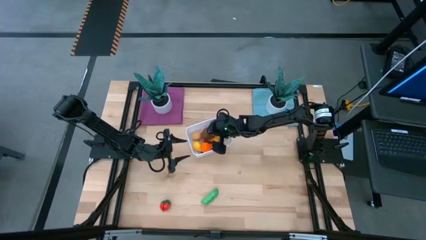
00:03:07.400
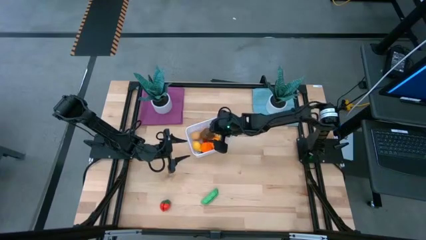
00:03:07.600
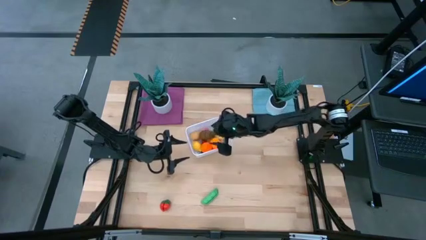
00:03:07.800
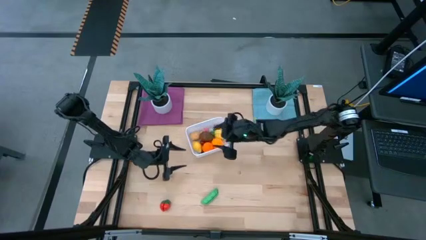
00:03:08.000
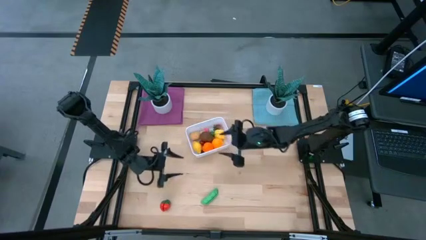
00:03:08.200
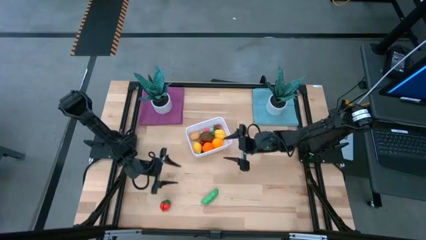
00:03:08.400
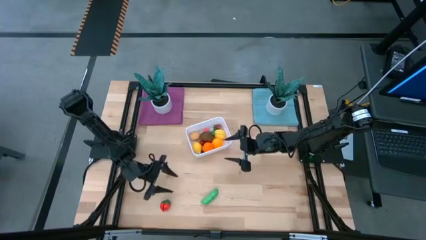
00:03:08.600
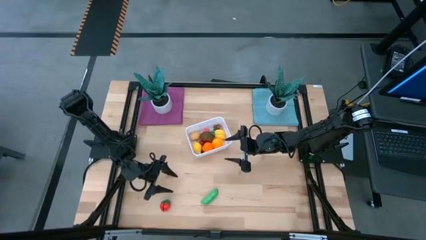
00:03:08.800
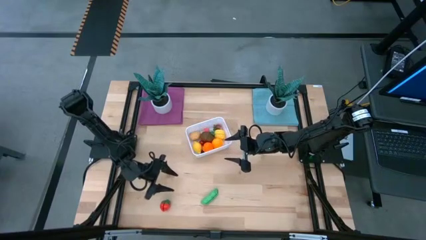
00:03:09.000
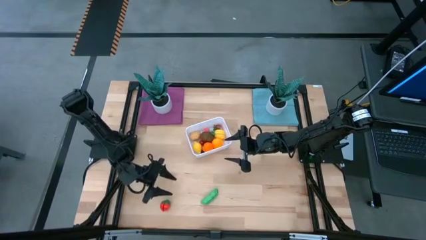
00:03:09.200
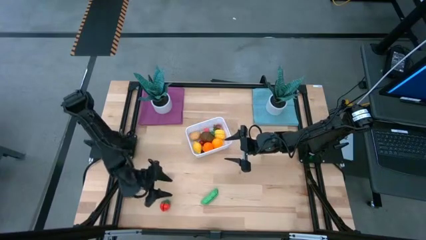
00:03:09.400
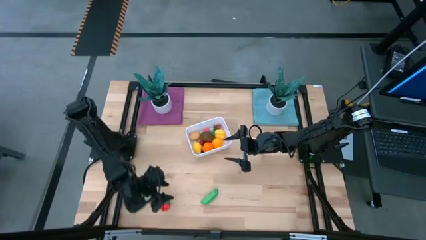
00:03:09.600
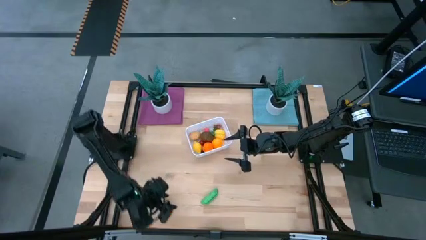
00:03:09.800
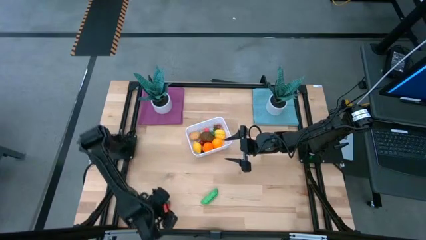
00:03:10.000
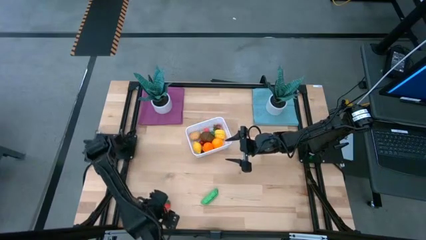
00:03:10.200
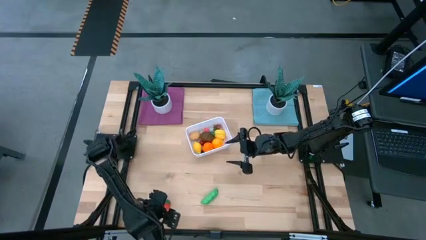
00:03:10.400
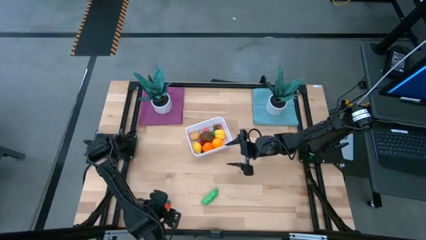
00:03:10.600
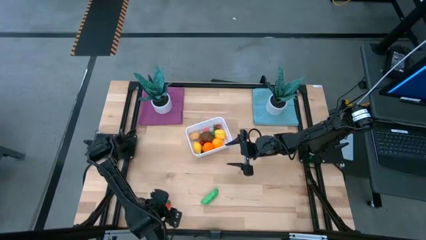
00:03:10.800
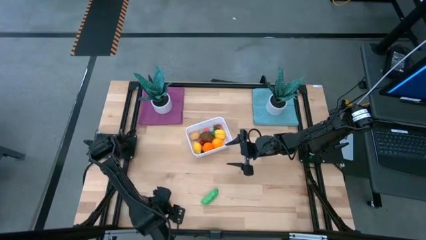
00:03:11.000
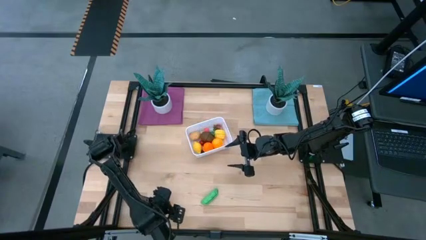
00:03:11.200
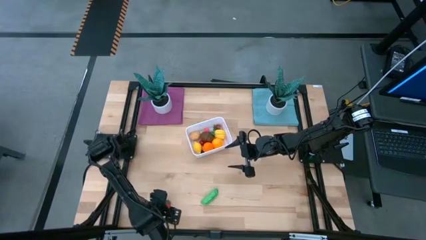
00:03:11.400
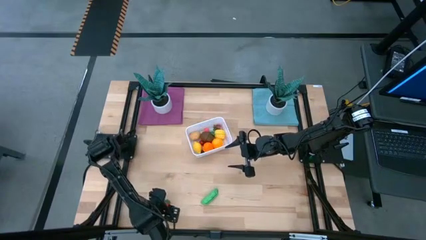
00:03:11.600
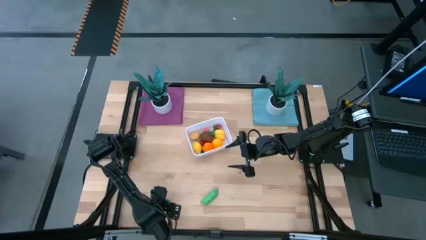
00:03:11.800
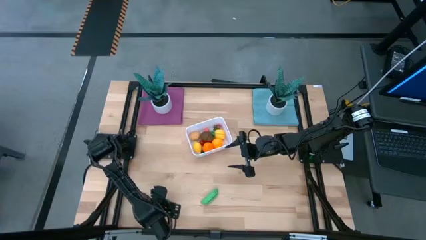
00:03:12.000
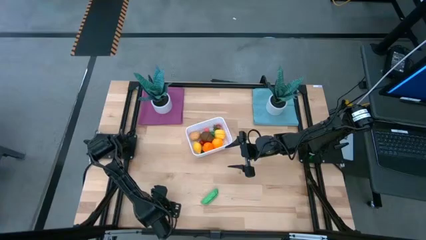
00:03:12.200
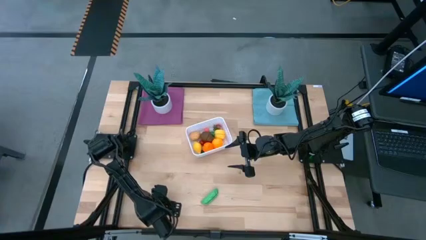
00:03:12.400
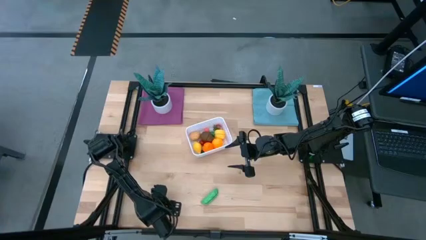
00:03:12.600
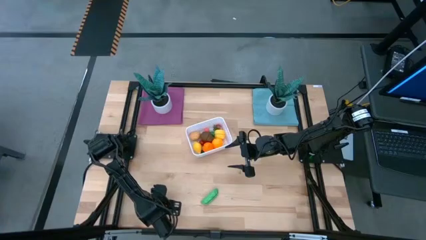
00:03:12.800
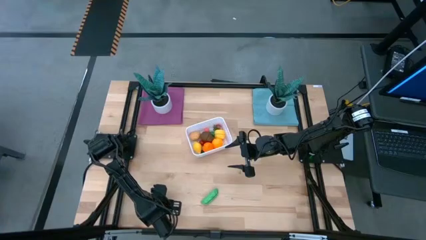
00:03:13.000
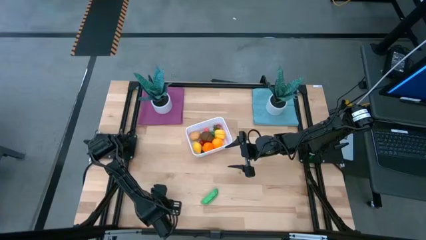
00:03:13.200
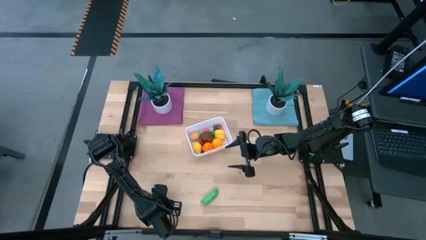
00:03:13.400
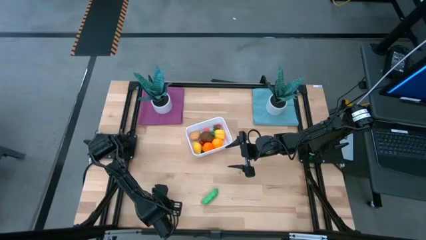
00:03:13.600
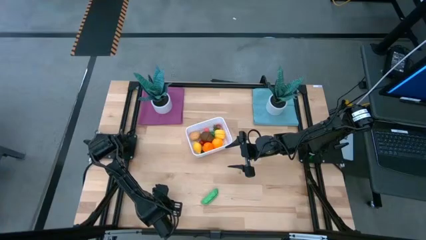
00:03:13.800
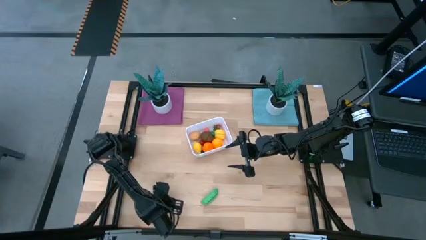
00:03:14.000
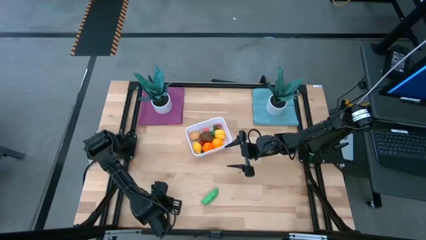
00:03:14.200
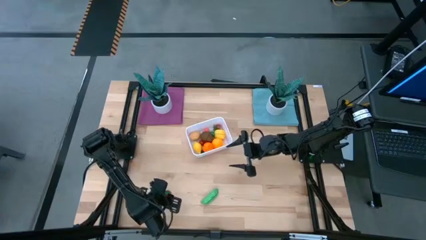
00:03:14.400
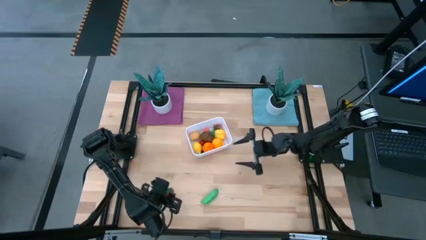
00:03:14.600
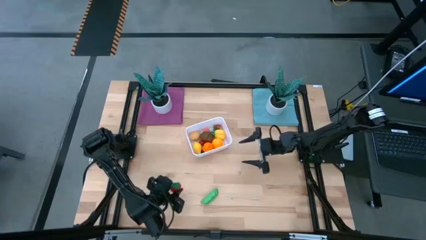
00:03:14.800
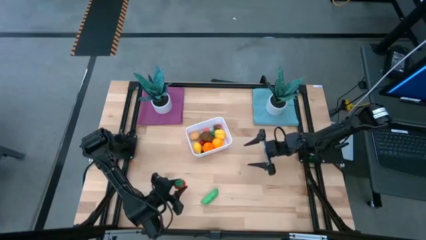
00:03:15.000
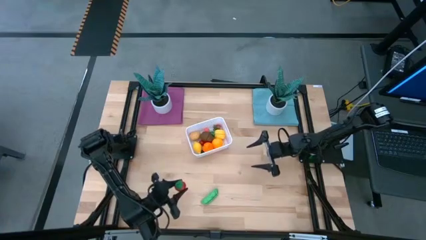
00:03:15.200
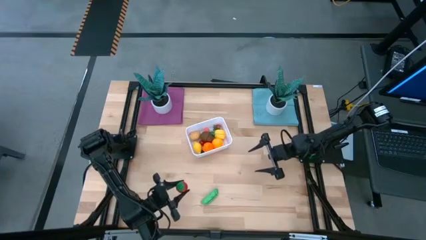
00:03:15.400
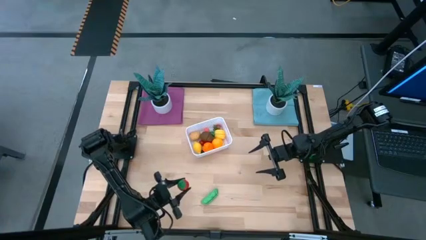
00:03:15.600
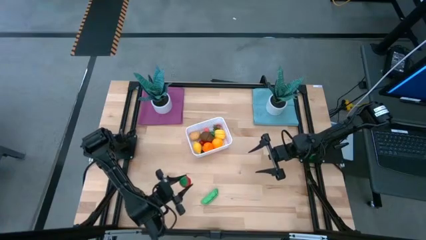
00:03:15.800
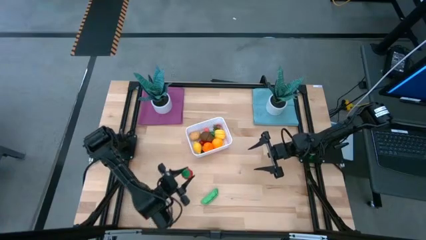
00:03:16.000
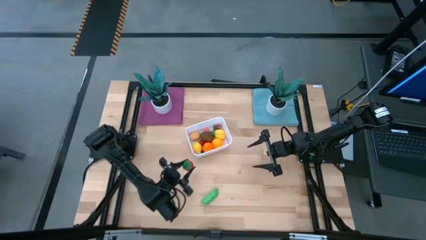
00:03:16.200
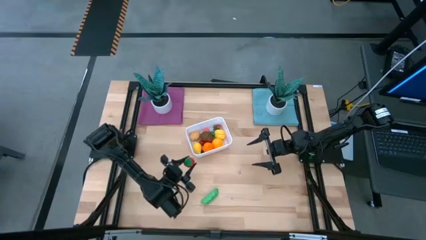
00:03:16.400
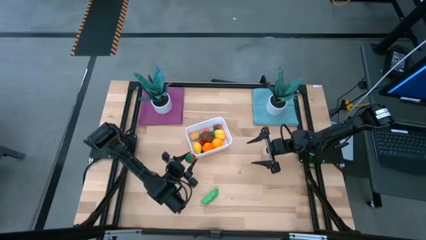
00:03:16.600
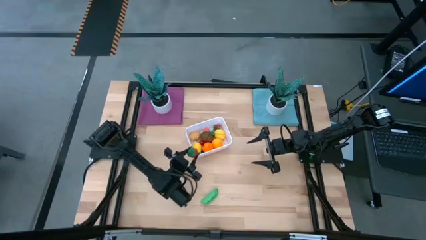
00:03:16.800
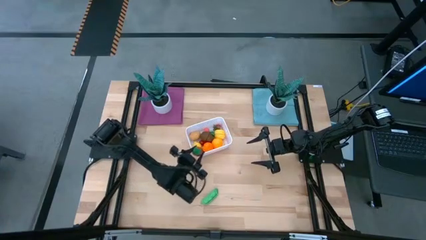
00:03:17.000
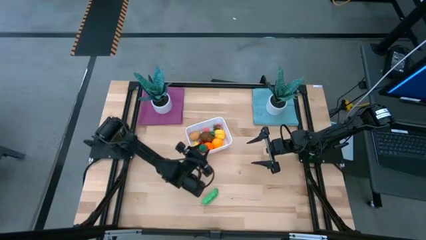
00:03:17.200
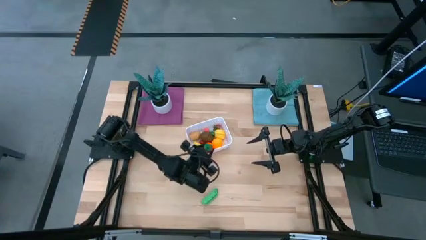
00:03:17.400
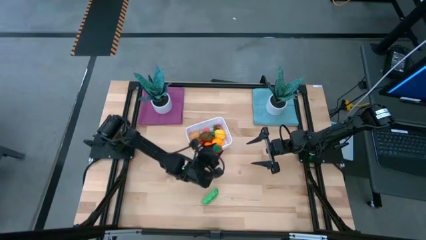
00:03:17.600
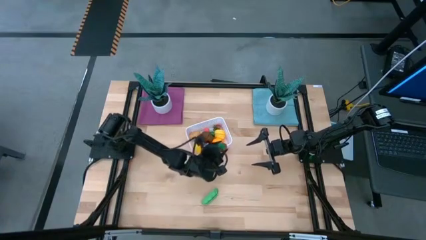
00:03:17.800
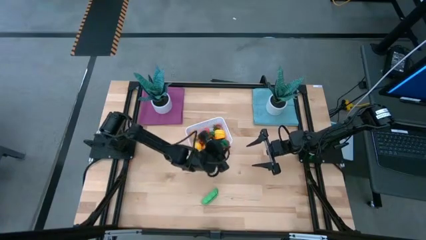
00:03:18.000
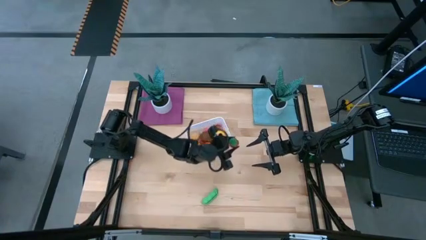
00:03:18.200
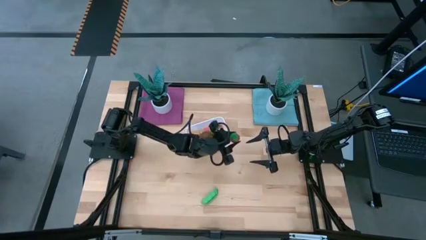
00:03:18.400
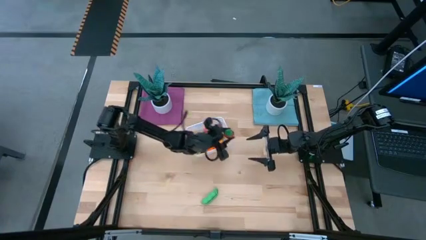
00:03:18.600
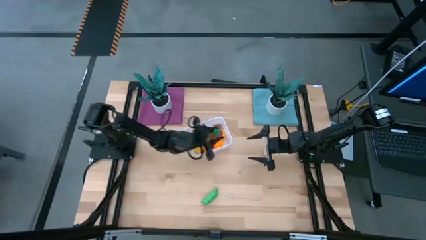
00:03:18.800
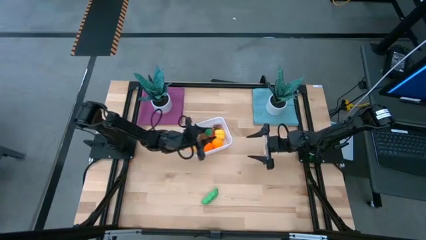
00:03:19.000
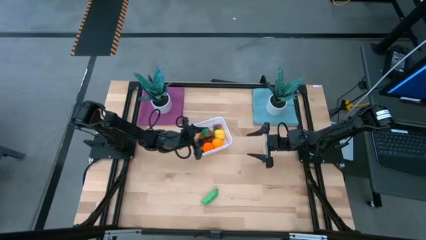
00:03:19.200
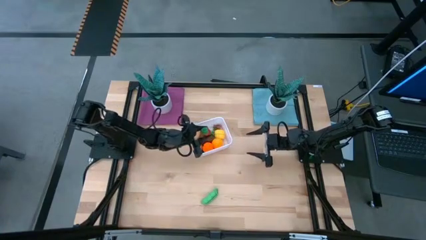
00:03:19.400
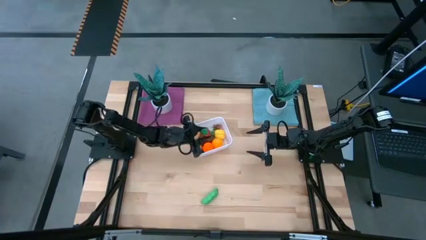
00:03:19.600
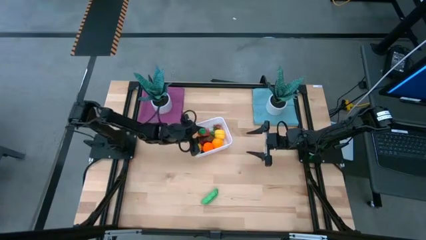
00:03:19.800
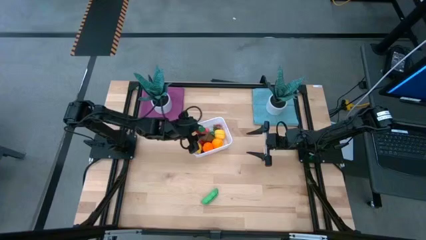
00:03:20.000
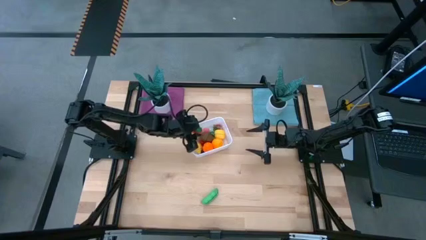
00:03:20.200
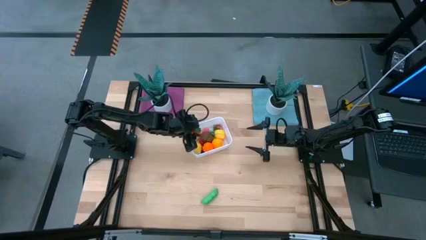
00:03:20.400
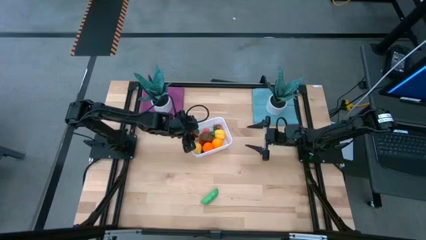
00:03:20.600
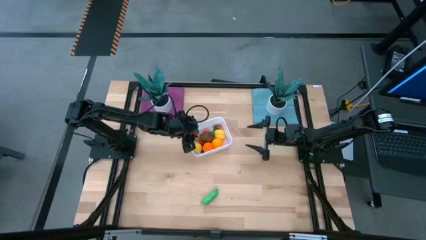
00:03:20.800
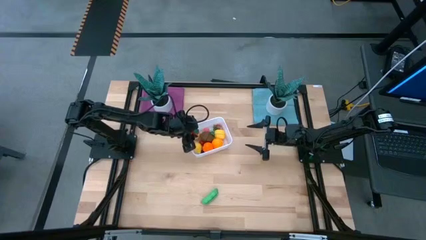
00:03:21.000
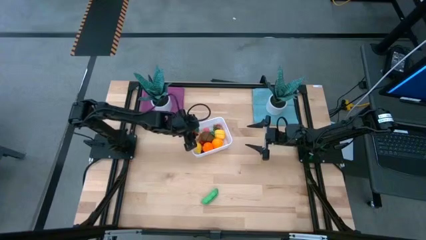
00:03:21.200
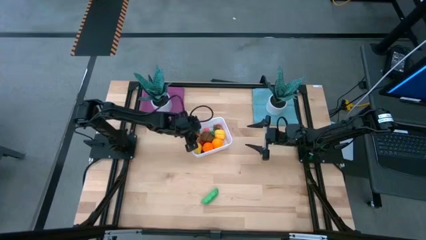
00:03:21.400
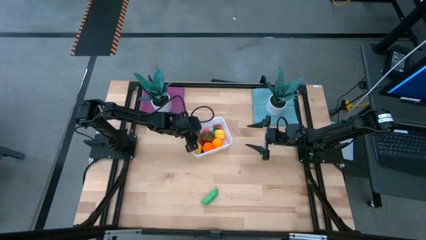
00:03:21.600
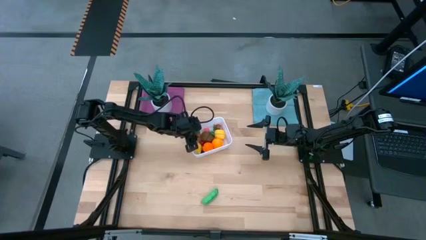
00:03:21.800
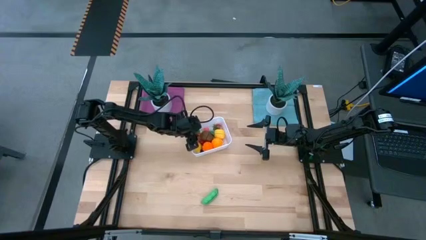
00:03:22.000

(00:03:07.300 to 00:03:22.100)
Task: Pick and placing Produce into tupperware
Put the red strawberry into the white bin
